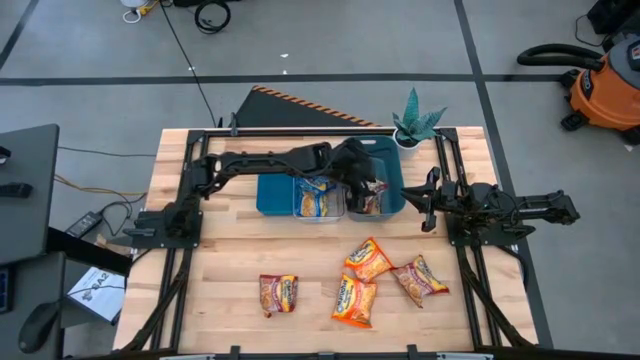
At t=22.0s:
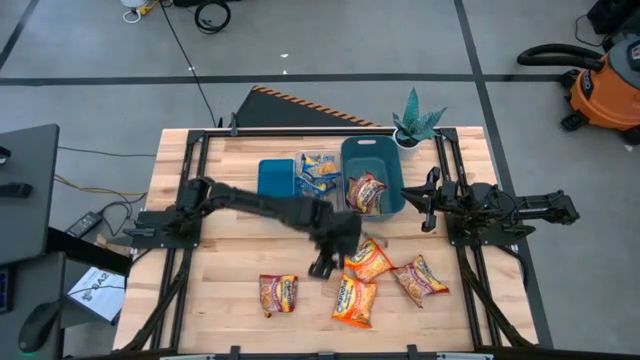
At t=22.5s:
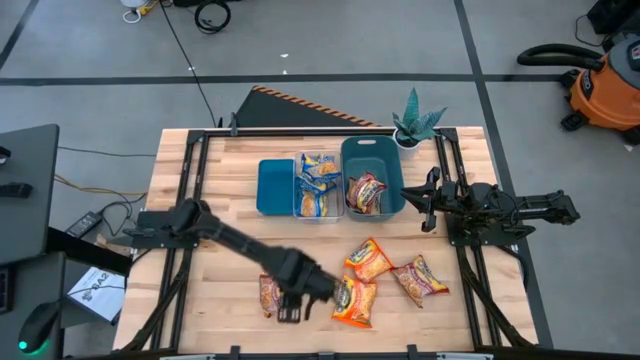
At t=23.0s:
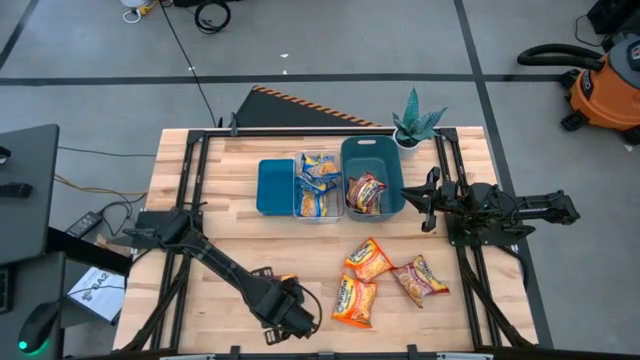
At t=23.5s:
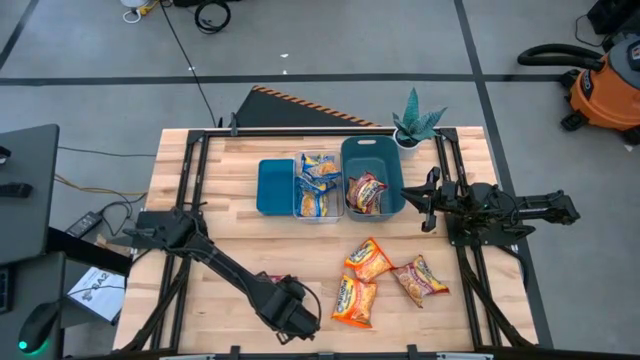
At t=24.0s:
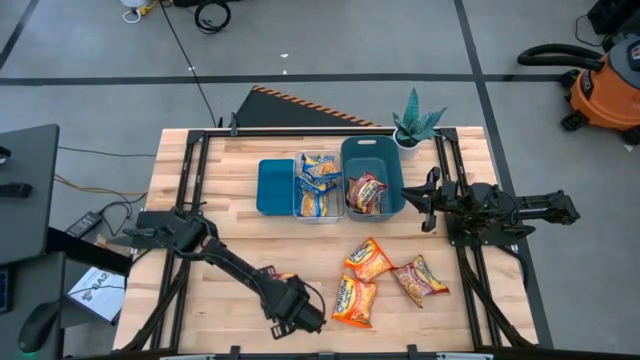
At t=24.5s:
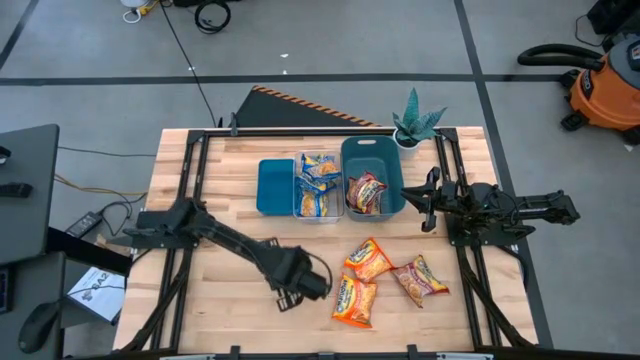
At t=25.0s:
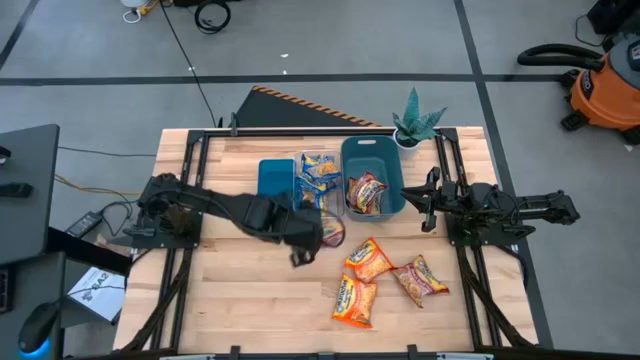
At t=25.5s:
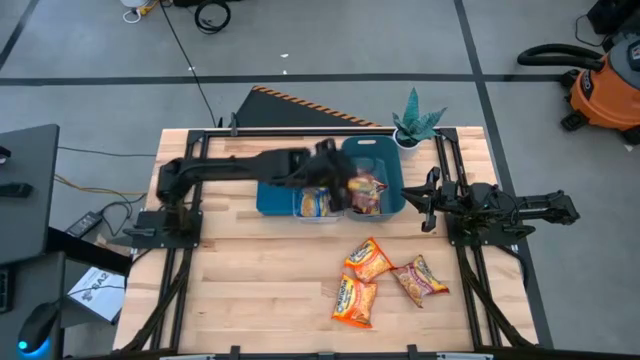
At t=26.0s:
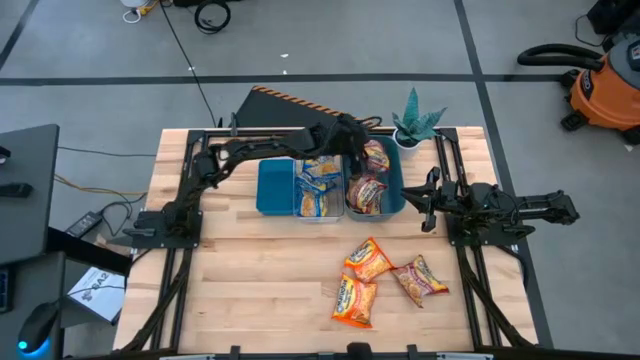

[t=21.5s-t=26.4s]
Task: Sort Maruchan noodles
Put the left red noodle into the green bin

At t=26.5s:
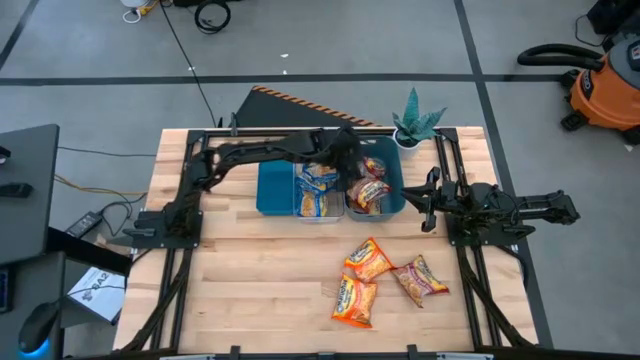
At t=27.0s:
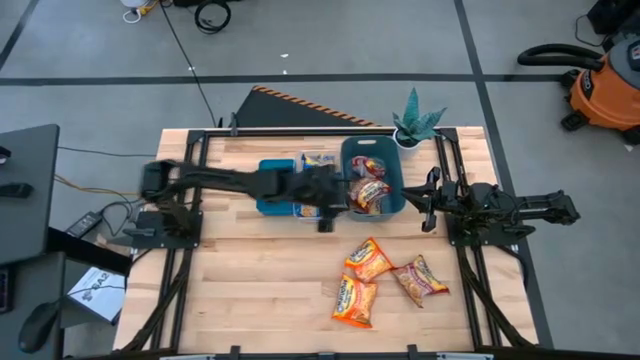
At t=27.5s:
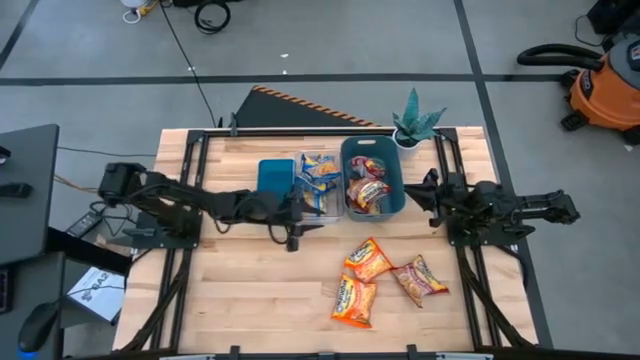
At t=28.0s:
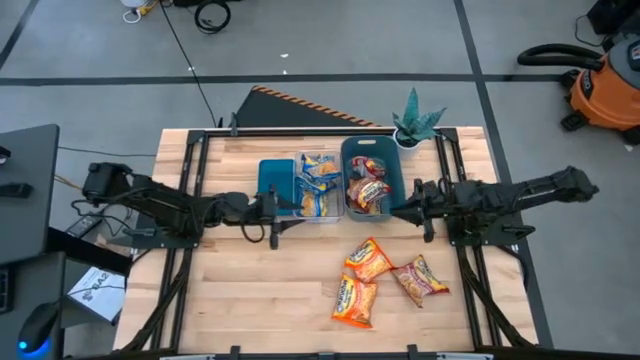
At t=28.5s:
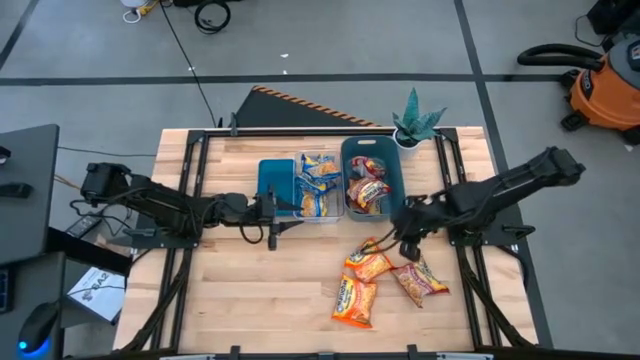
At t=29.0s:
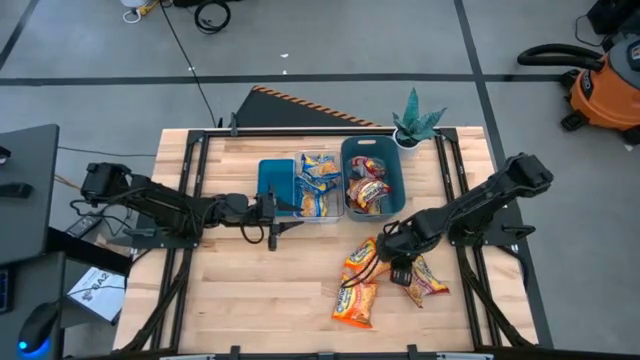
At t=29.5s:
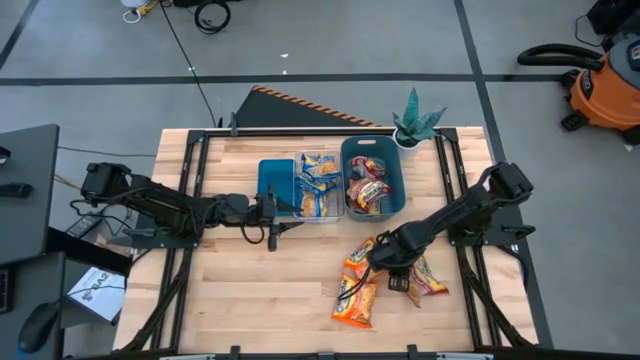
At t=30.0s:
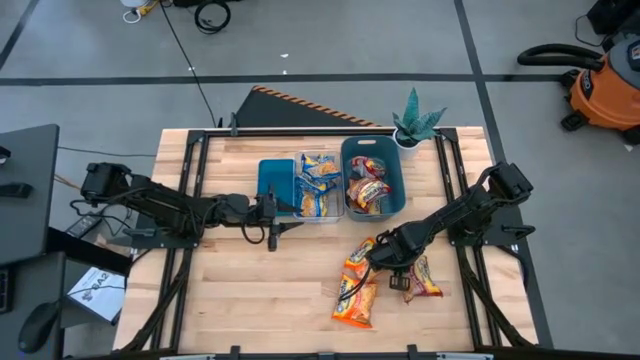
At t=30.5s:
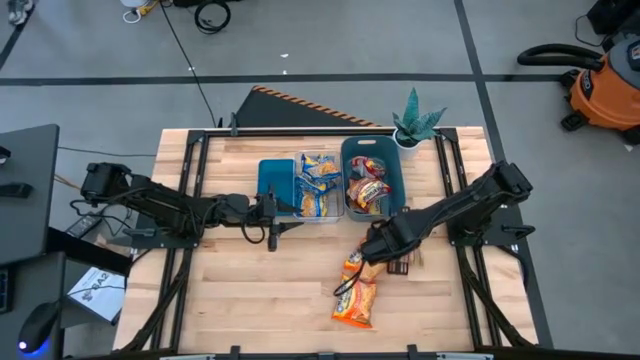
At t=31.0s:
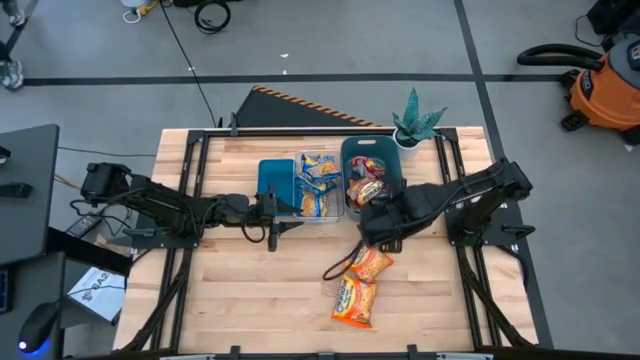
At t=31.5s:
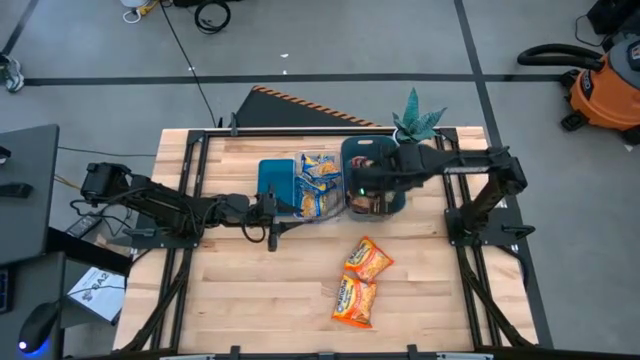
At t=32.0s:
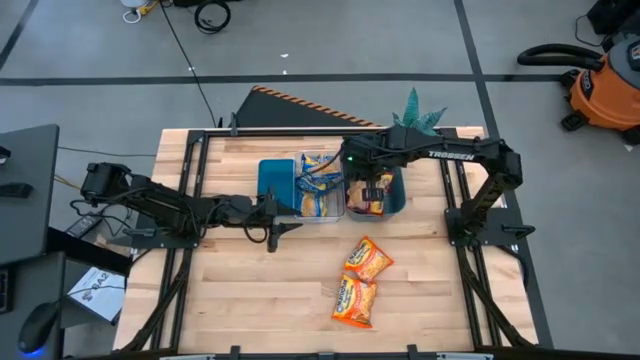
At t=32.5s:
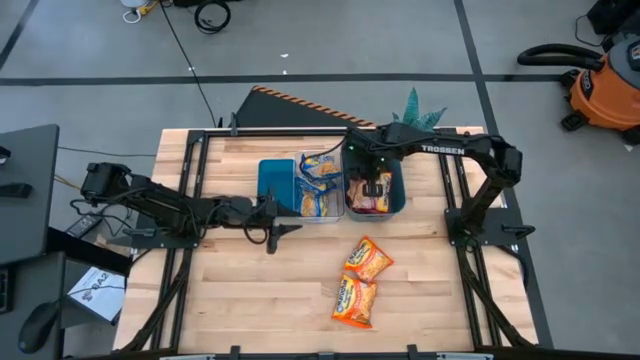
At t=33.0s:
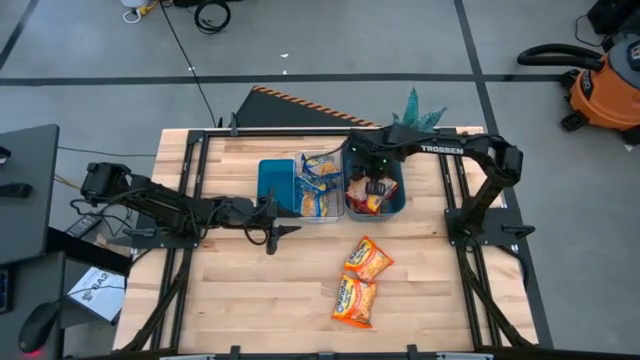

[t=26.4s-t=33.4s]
Put the red noodle into the green bin

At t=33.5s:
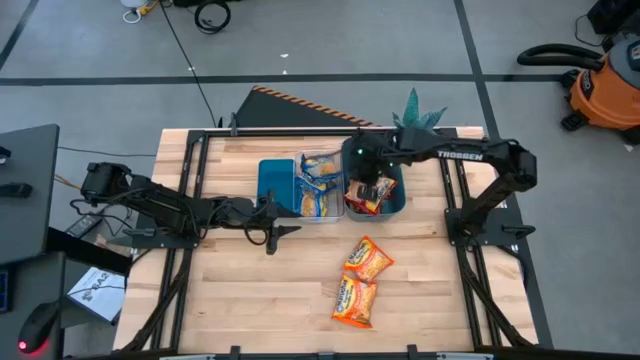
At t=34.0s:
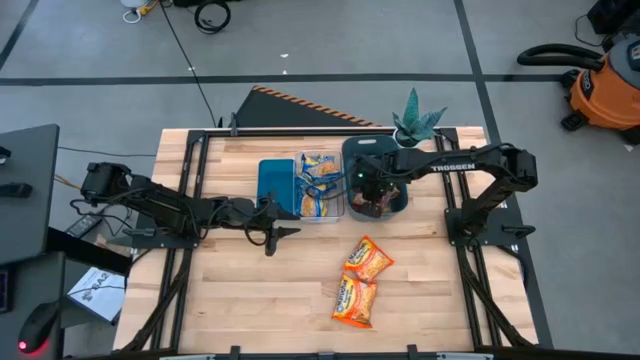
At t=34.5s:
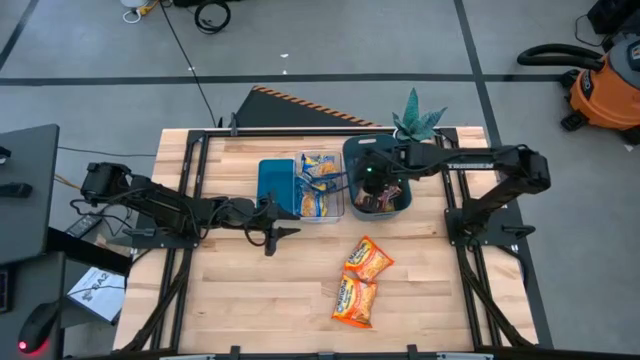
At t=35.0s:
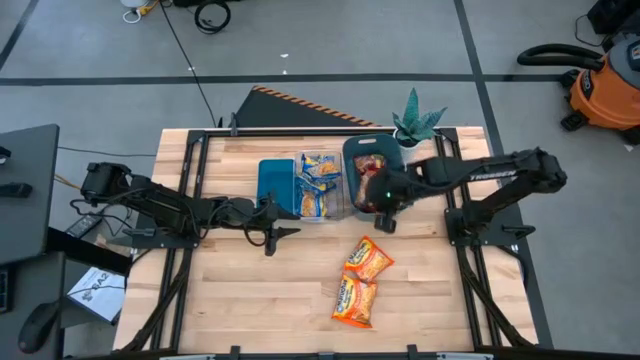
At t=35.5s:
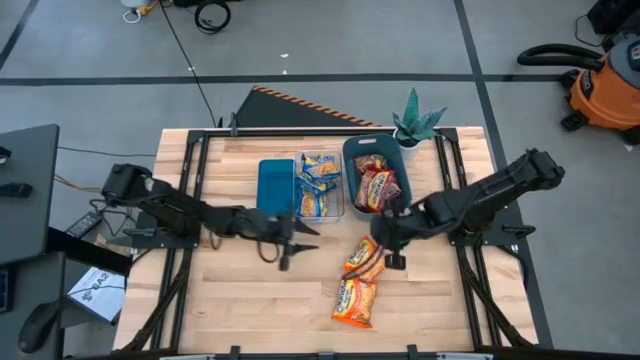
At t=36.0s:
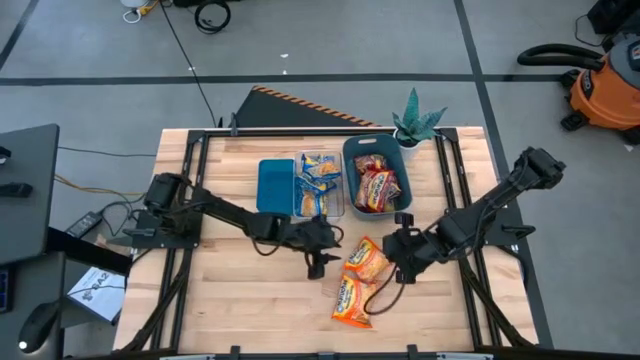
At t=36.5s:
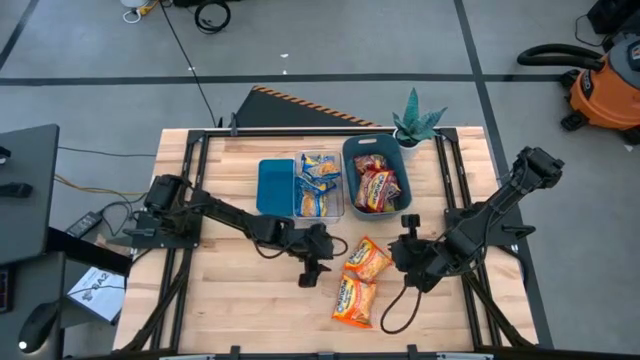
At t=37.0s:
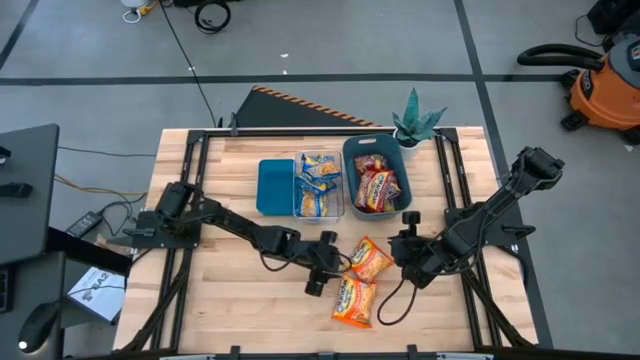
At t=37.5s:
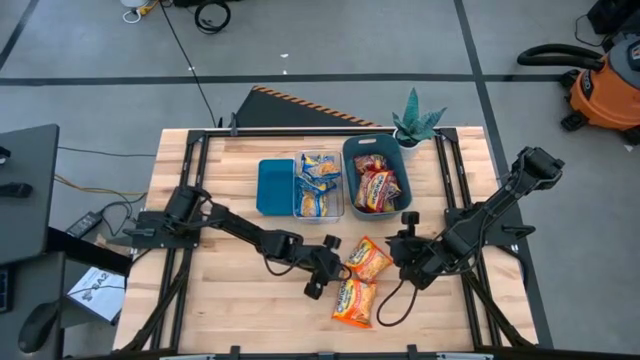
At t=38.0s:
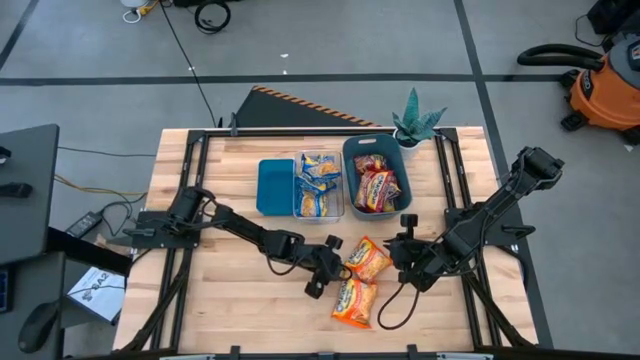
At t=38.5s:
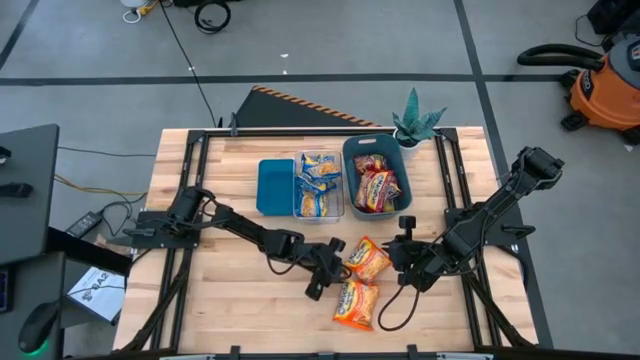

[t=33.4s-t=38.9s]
Put the top orange noodle into the blue bin

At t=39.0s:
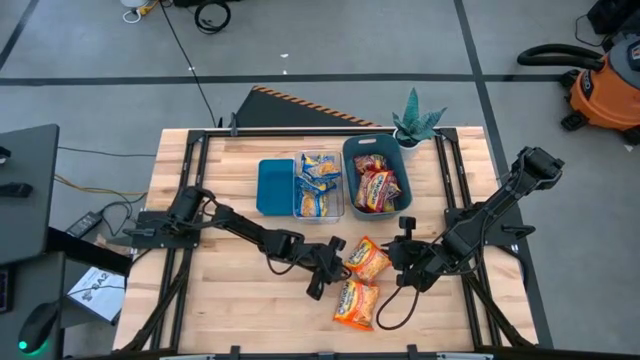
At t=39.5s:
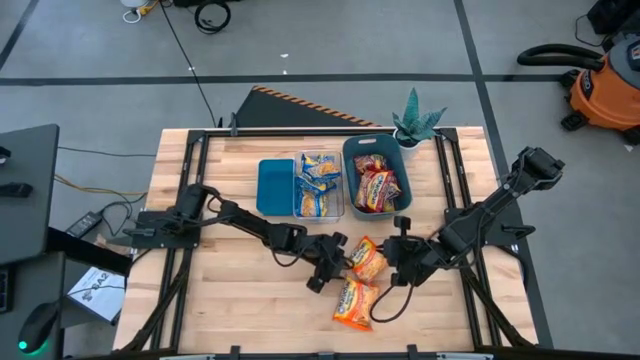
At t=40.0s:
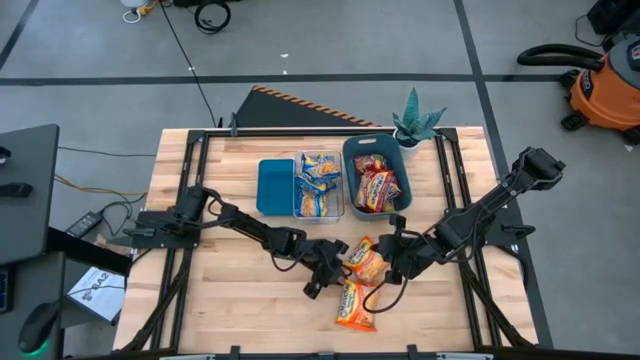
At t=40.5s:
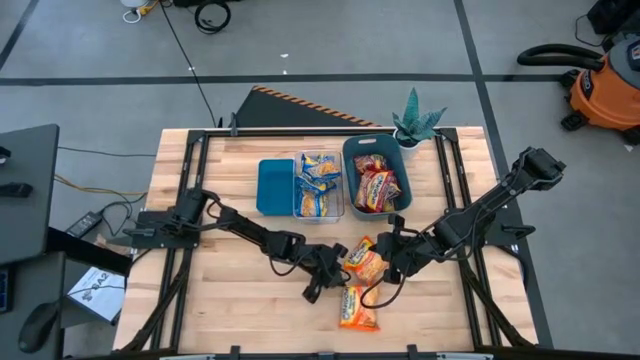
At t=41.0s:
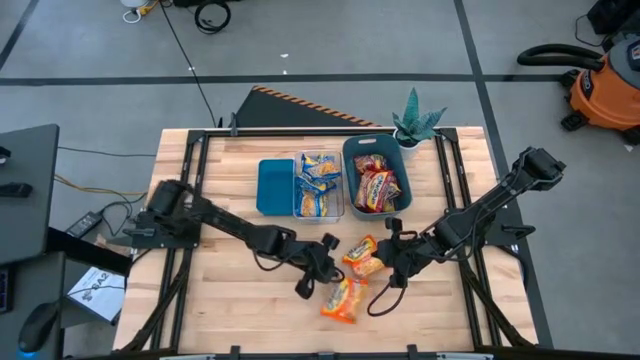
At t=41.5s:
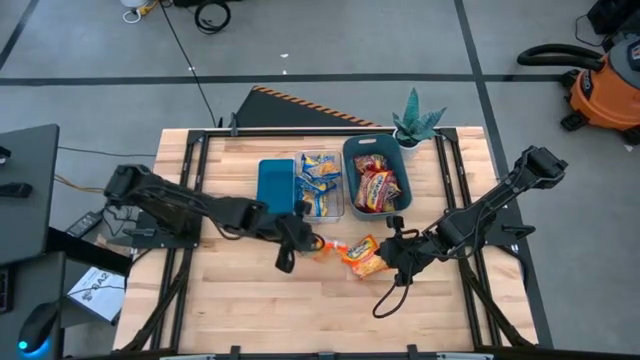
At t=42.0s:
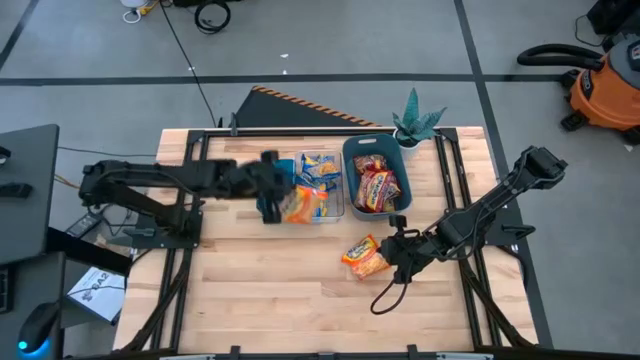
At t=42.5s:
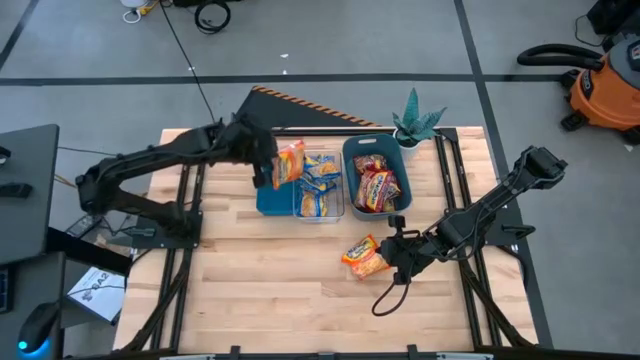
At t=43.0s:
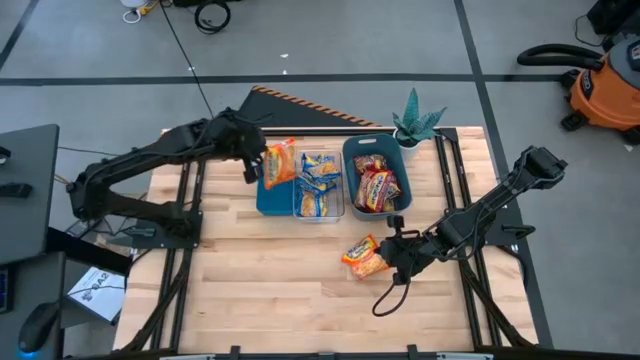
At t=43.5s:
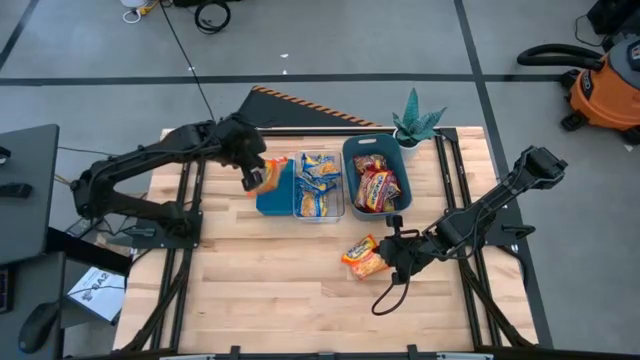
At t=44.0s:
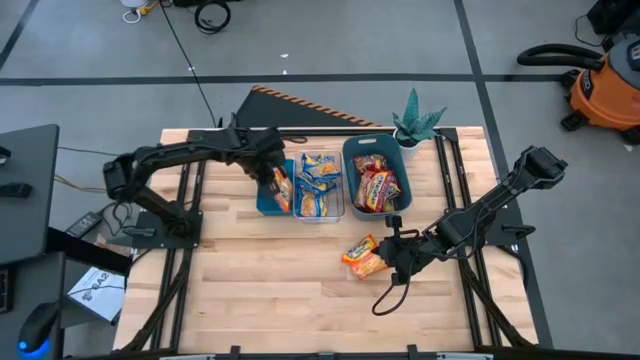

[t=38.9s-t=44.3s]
Put the bottom orange noodle into the blue bin
